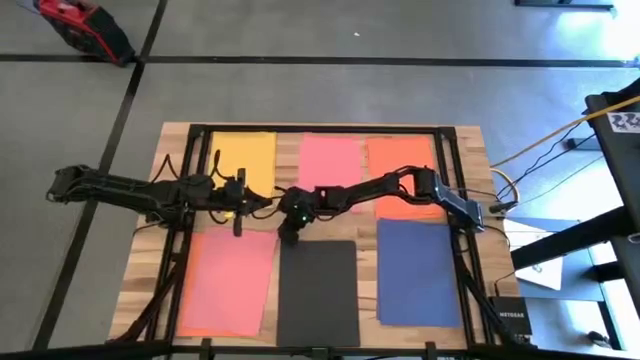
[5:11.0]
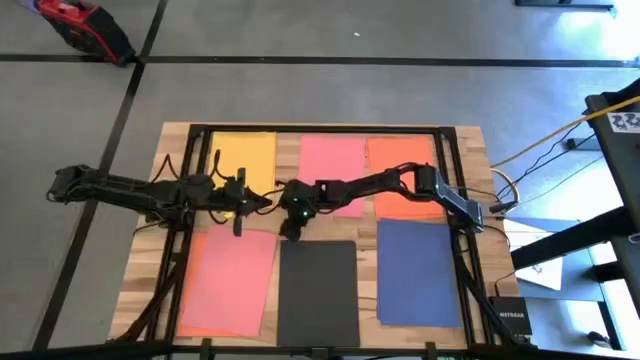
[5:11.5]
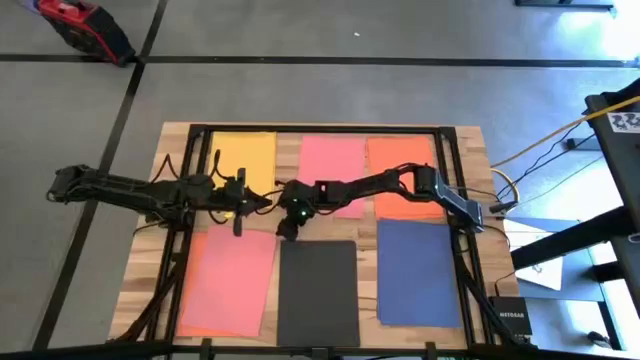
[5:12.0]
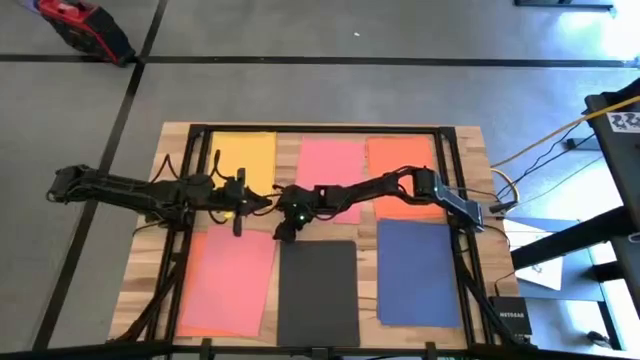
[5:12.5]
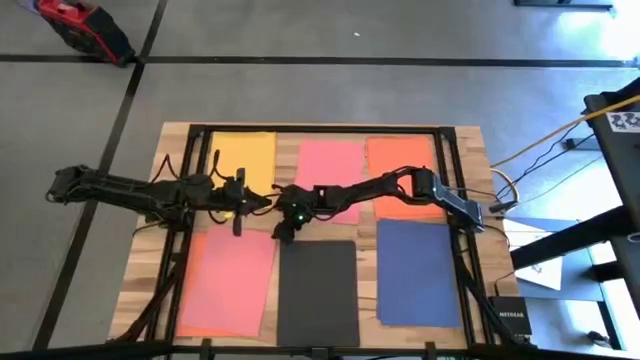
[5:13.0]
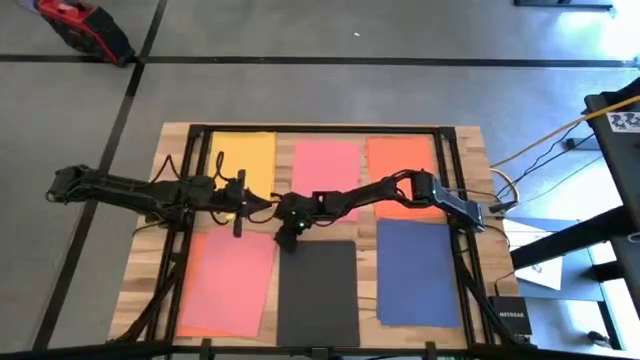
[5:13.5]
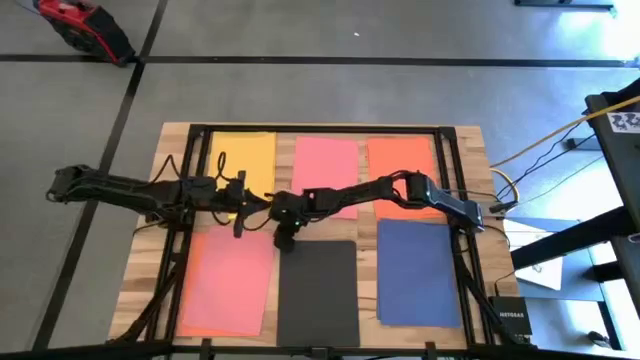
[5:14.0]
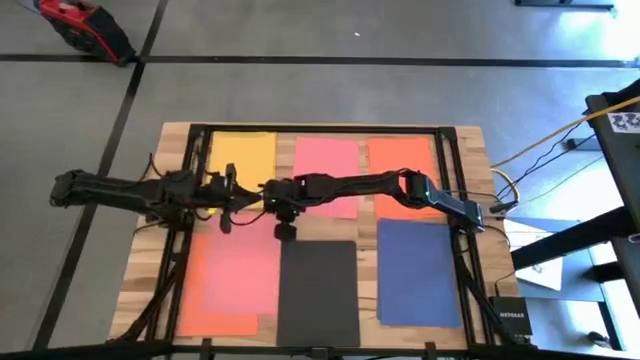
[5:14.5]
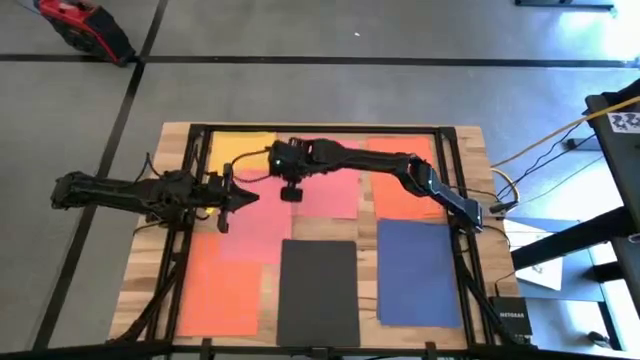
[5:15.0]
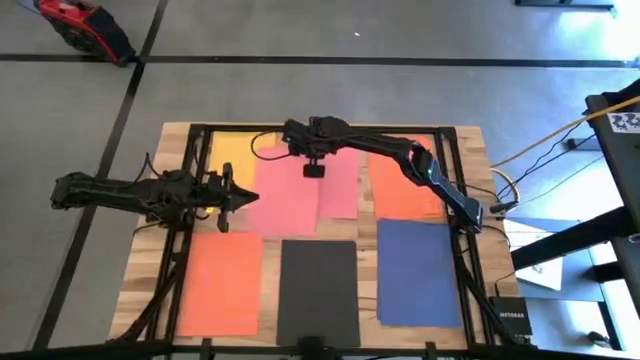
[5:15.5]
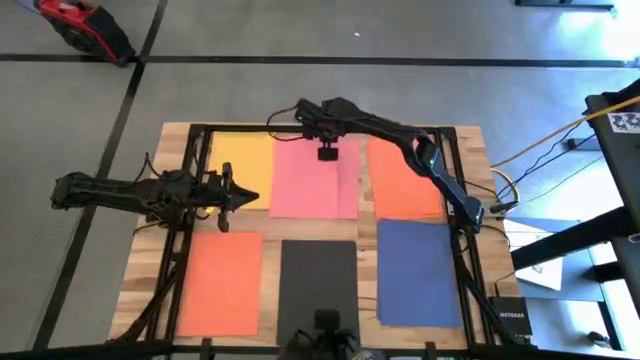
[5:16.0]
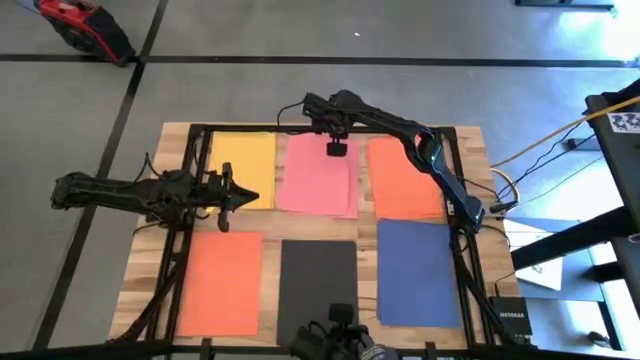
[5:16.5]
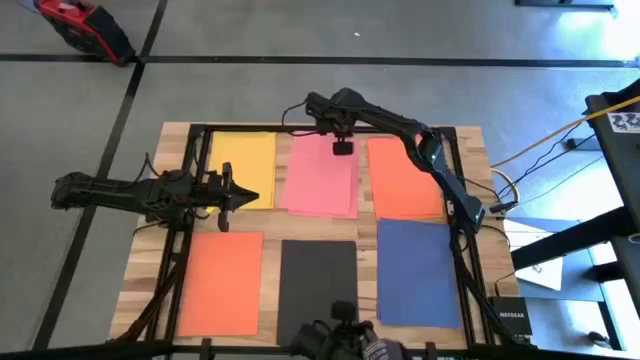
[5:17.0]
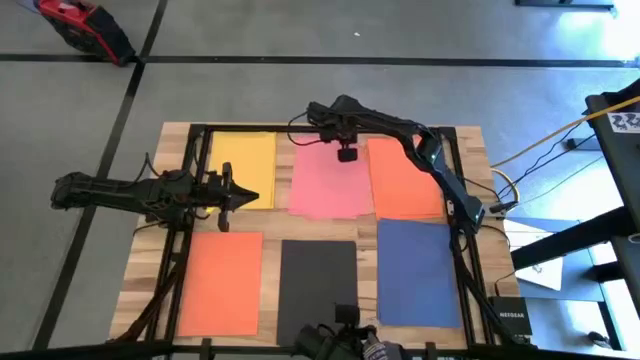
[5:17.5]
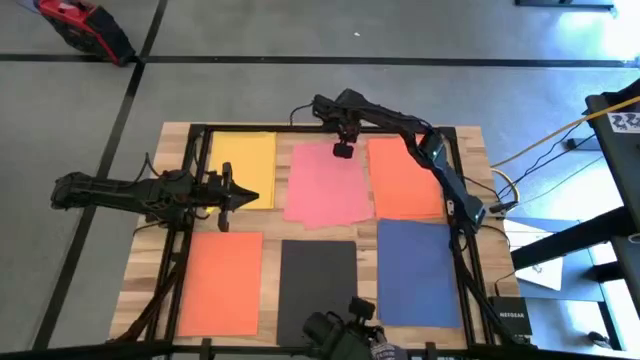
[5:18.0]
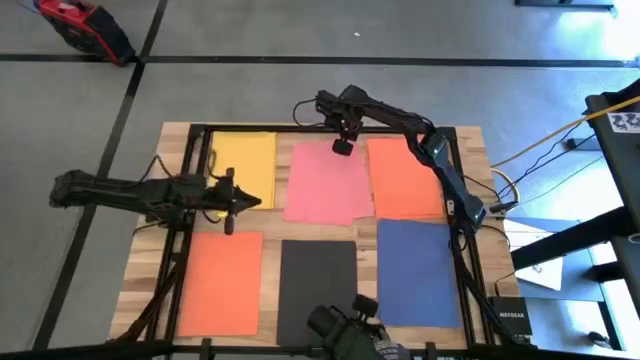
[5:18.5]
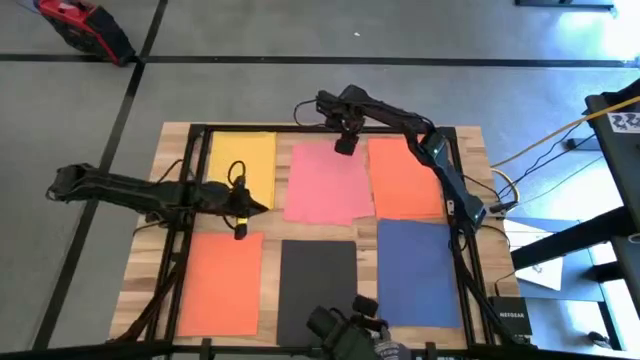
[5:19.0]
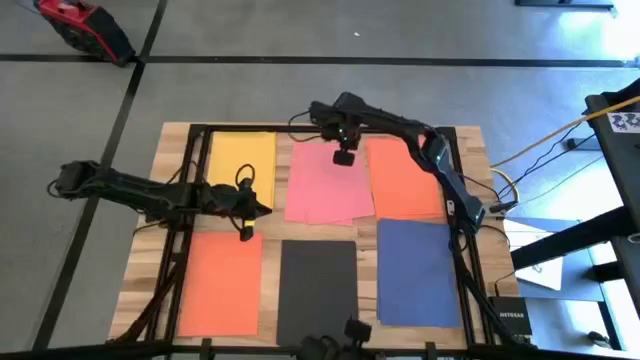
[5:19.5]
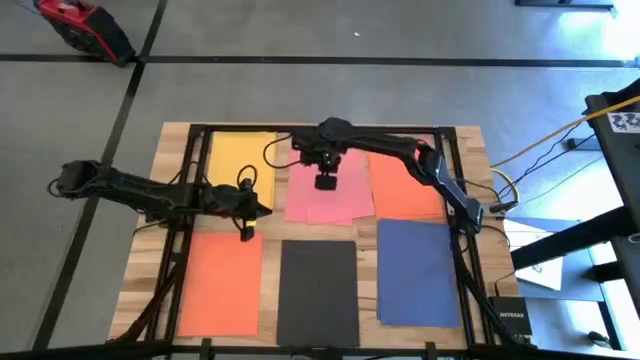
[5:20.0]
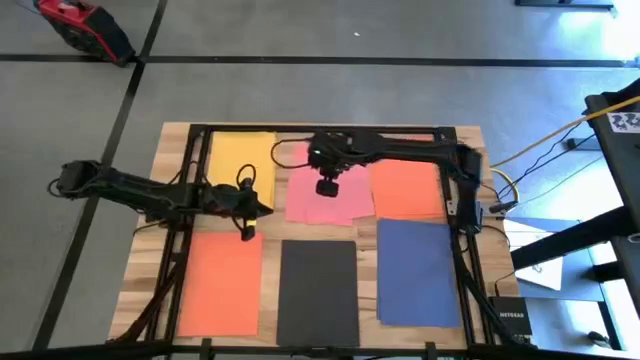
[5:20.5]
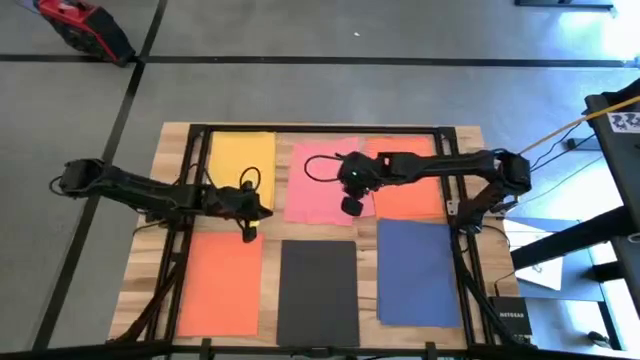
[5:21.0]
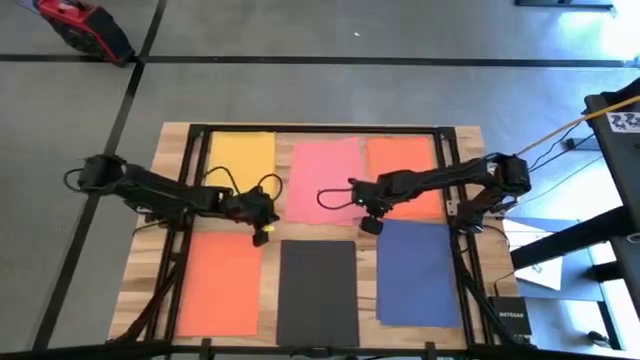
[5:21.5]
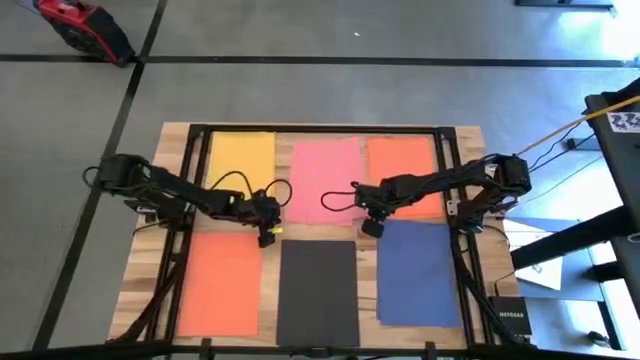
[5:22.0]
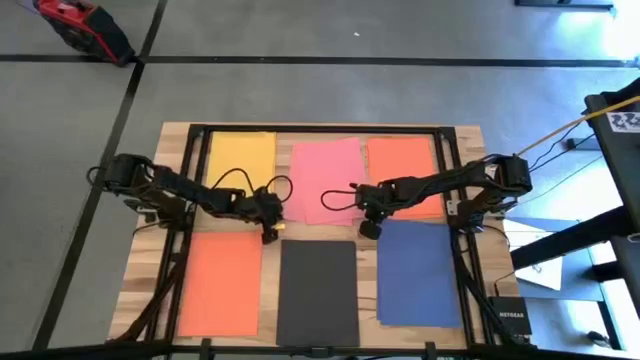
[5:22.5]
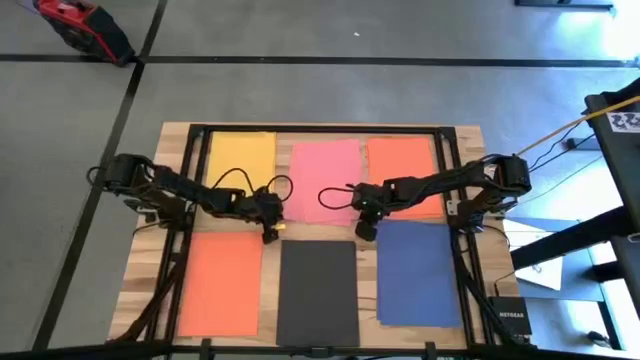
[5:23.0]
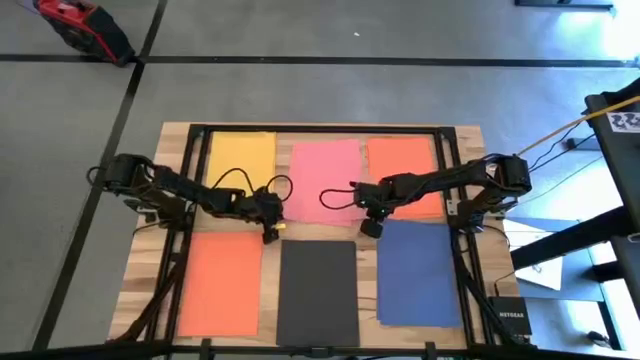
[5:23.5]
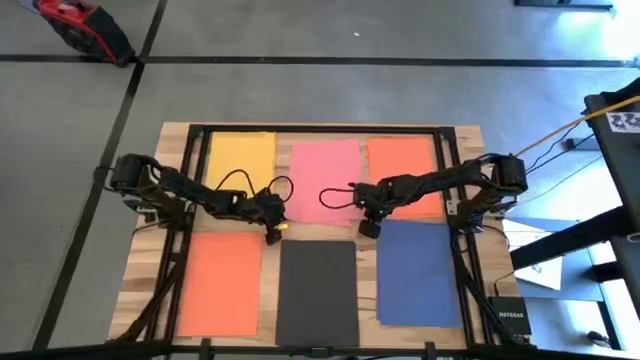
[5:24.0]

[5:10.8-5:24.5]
Task: Organize paper
Stack the pink paper on top of the pink paper

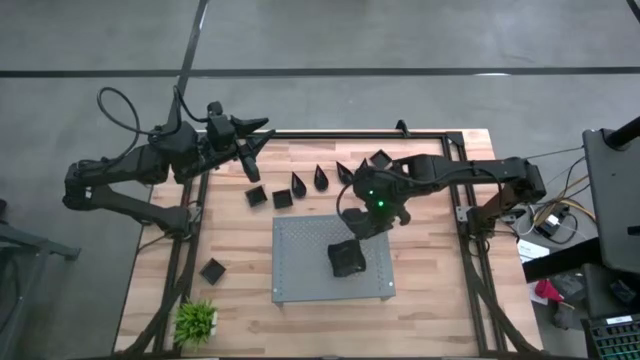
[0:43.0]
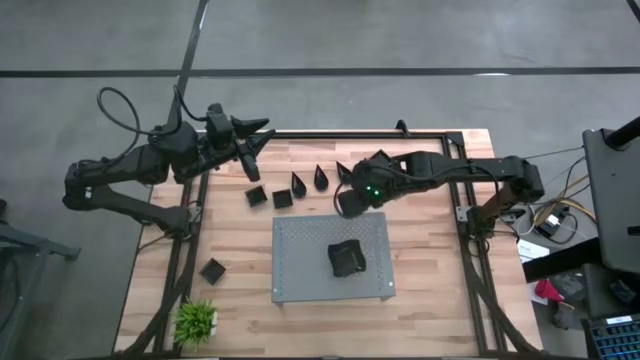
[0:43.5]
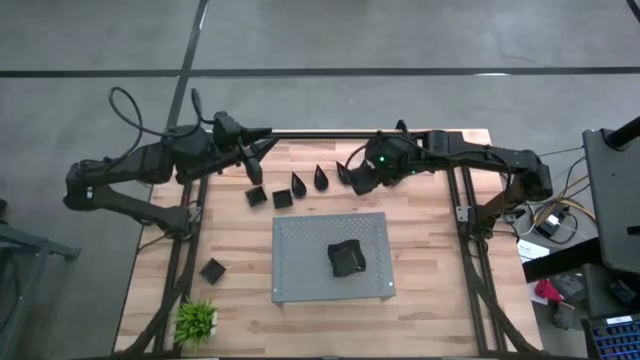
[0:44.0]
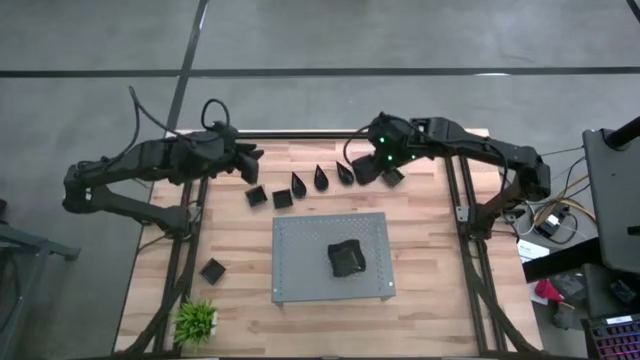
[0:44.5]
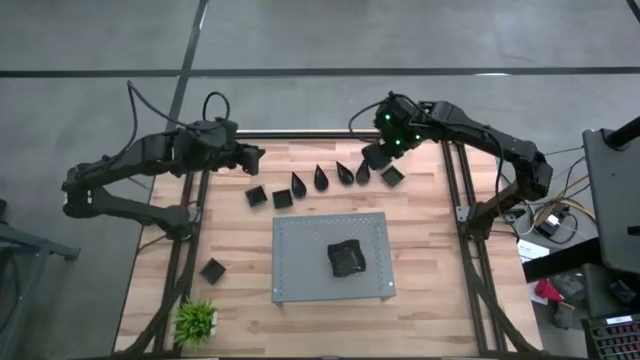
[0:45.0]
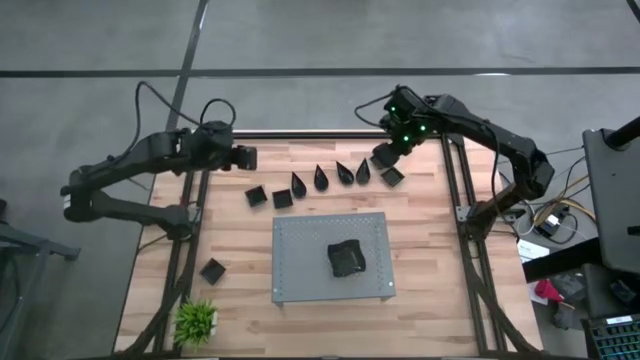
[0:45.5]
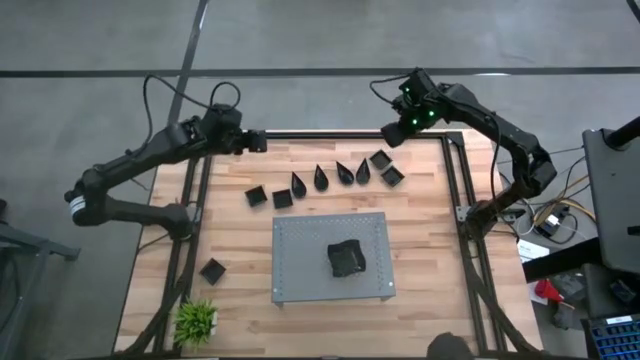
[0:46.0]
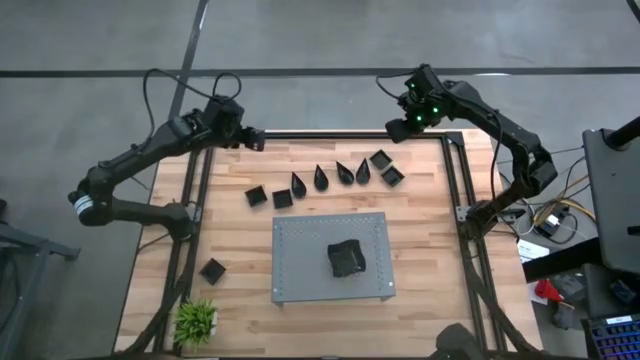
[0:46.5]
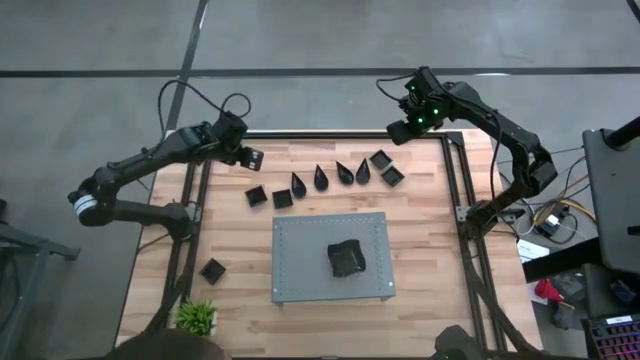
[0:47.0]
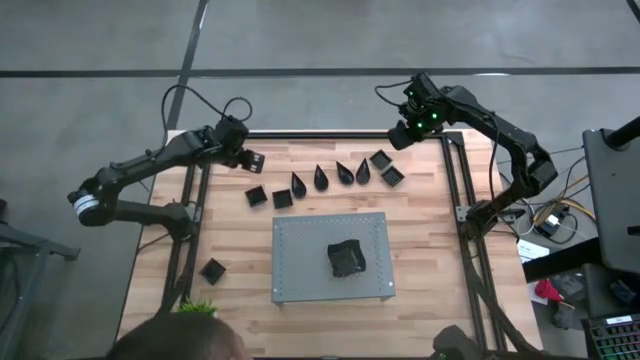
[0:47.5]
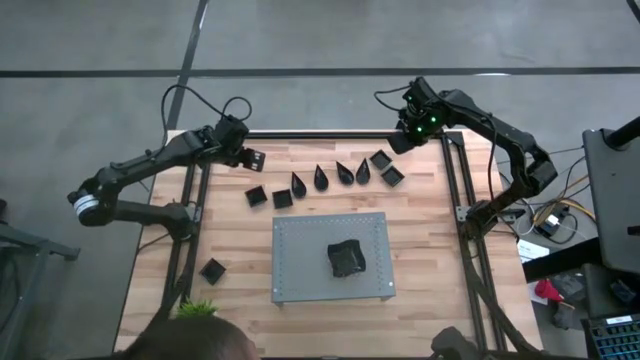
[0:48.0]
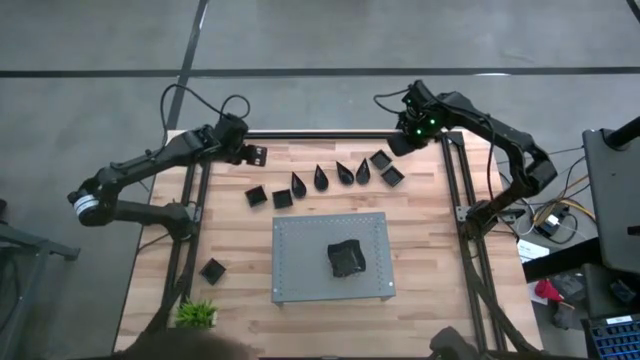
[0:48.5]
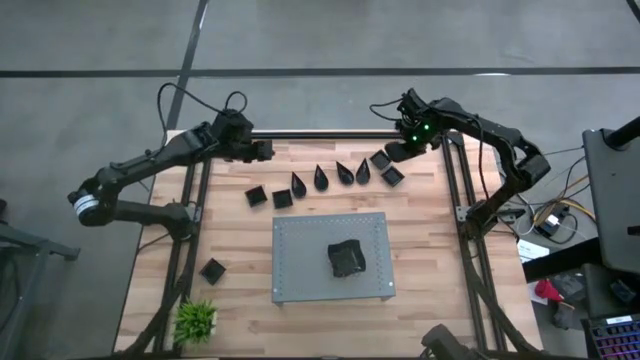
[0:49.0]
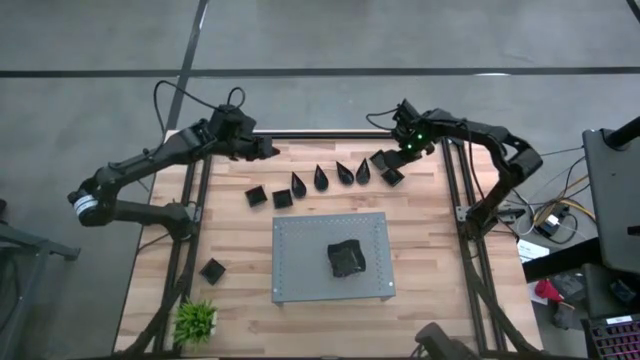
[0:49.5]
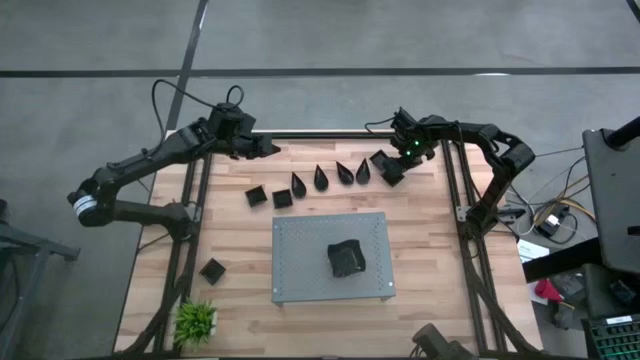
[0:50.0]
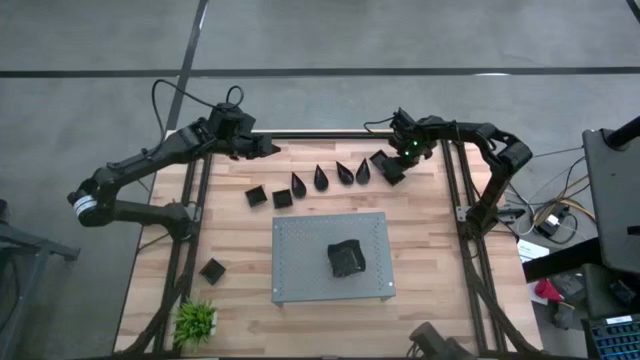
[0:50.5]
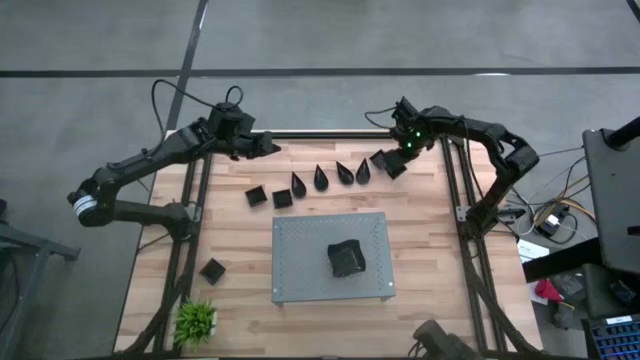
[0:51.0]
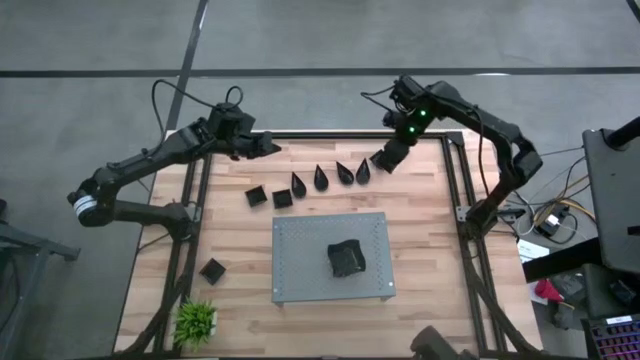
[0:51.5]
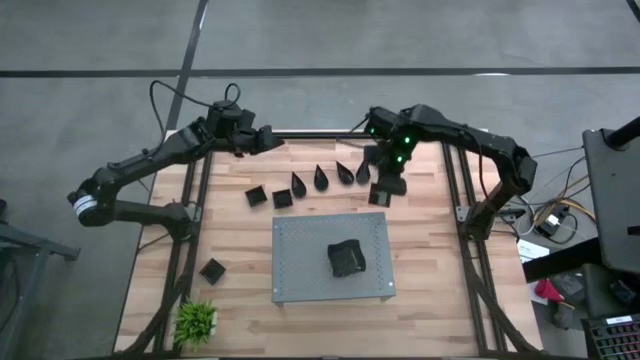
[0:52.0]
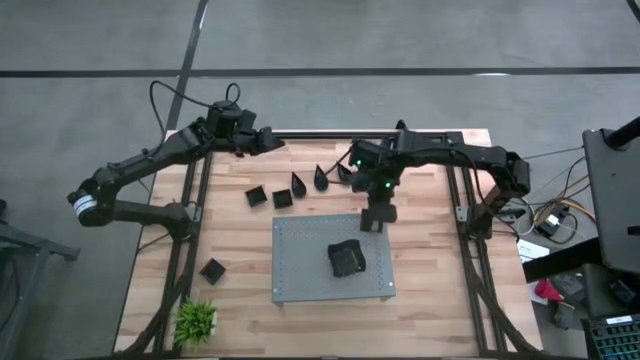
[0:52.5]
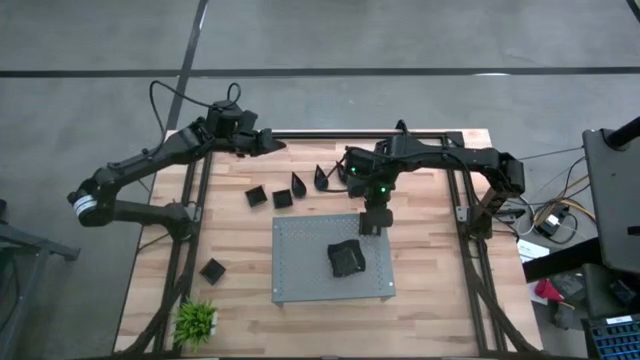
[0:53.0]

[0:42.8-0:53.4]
Task: Pick & Place Mini shaped plates
Put the square plate on the shelf
